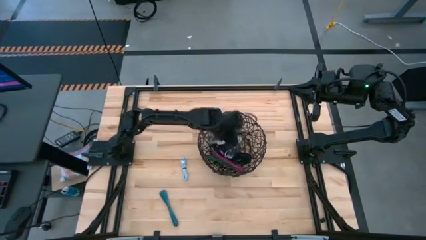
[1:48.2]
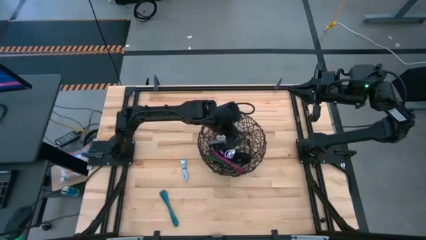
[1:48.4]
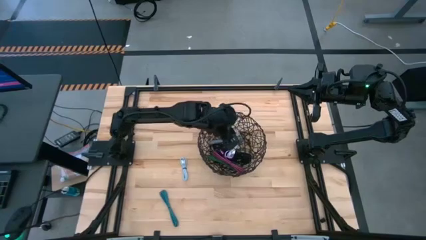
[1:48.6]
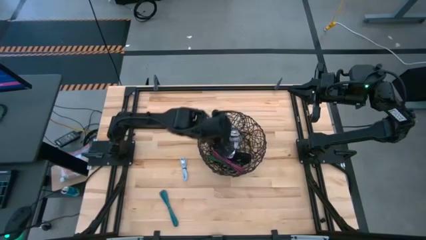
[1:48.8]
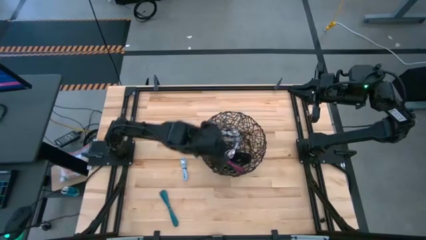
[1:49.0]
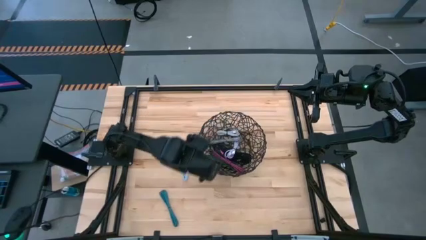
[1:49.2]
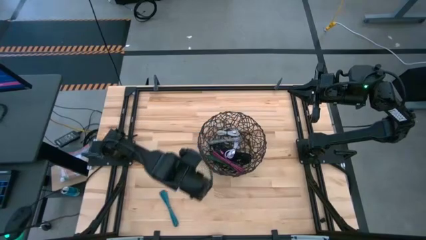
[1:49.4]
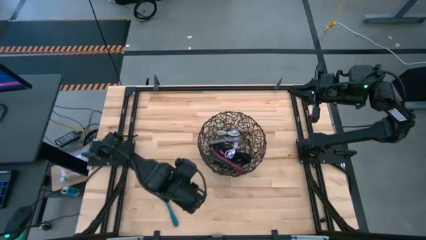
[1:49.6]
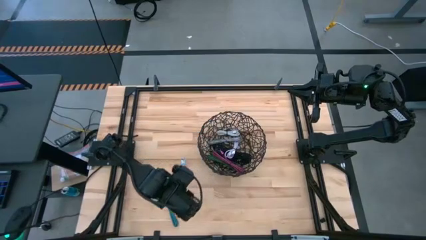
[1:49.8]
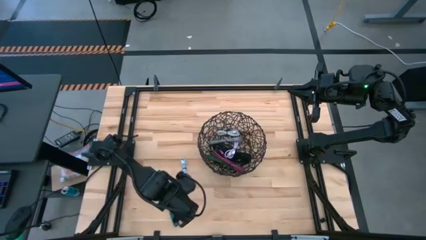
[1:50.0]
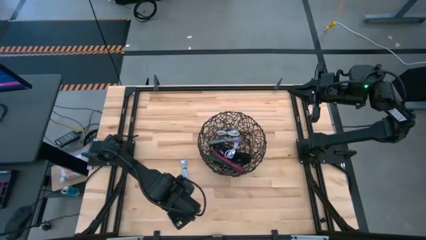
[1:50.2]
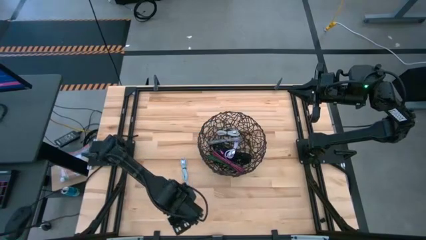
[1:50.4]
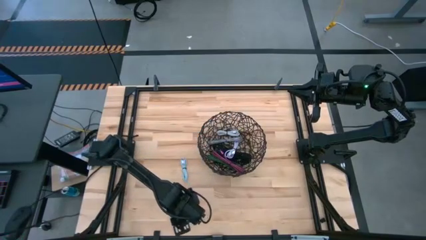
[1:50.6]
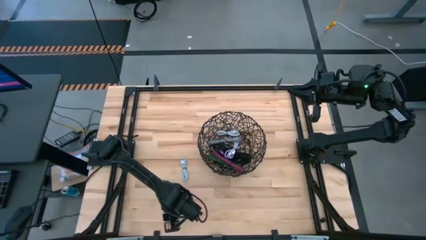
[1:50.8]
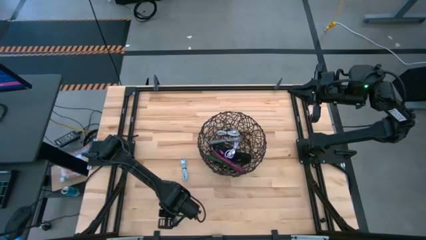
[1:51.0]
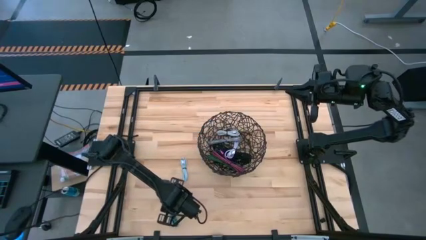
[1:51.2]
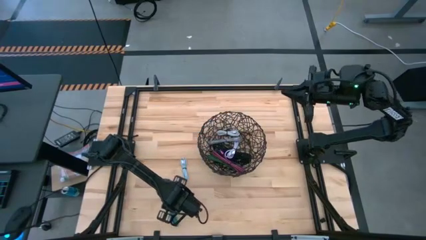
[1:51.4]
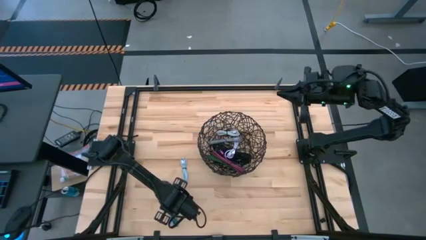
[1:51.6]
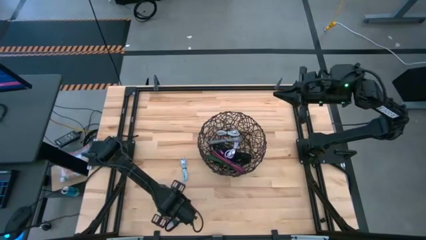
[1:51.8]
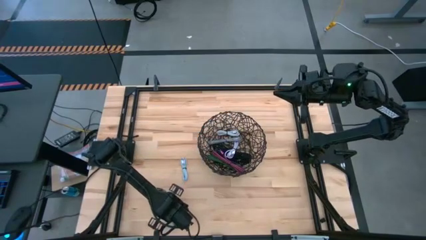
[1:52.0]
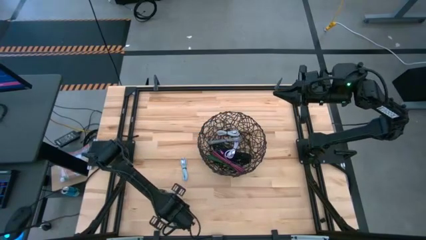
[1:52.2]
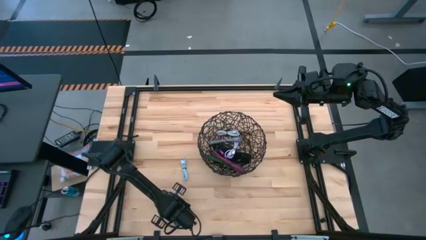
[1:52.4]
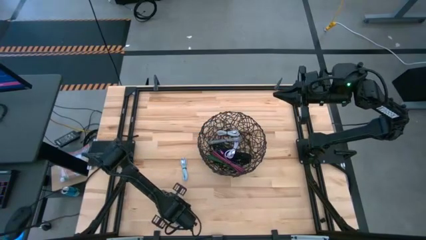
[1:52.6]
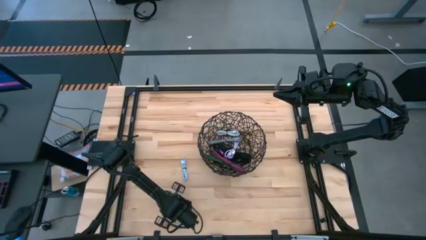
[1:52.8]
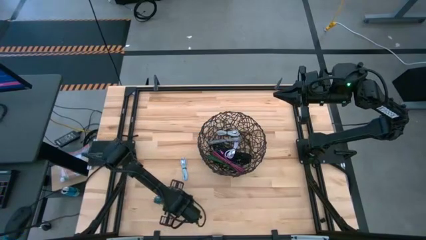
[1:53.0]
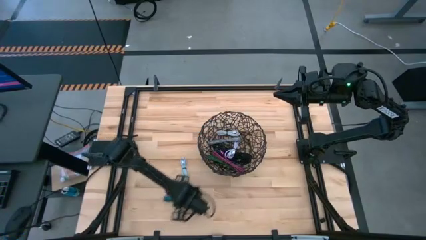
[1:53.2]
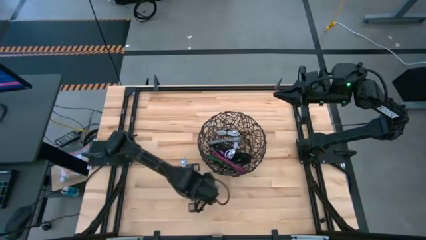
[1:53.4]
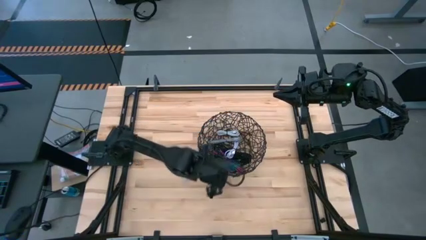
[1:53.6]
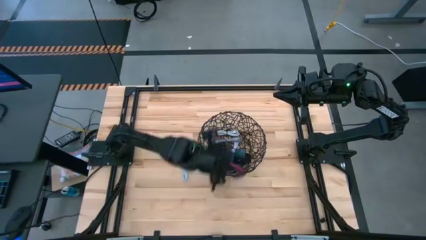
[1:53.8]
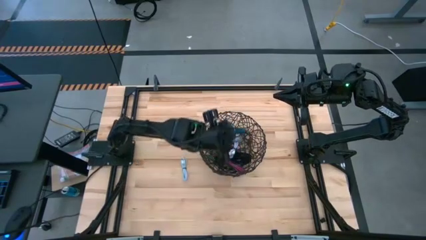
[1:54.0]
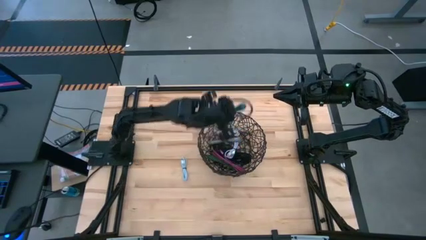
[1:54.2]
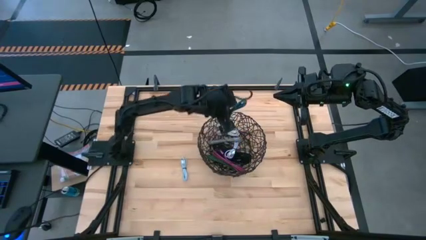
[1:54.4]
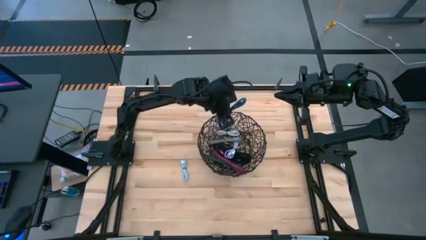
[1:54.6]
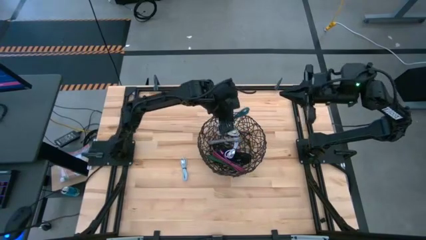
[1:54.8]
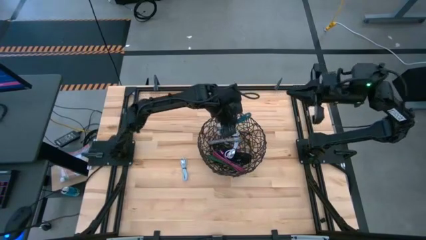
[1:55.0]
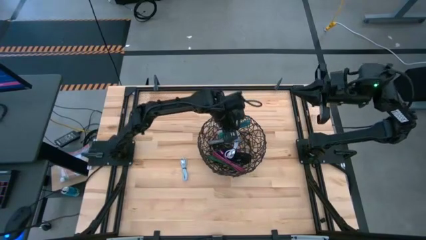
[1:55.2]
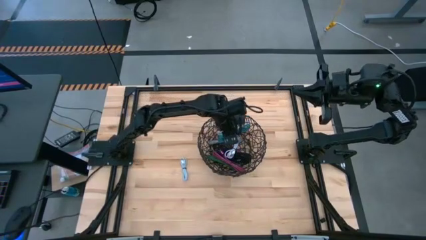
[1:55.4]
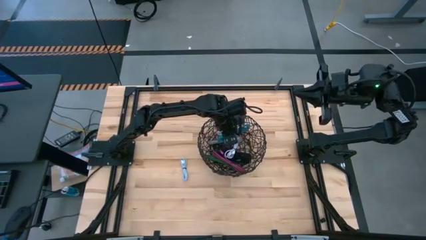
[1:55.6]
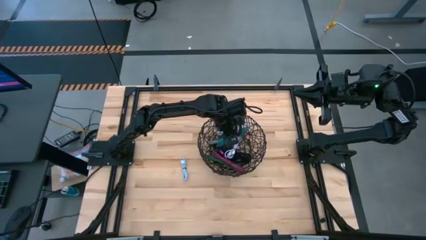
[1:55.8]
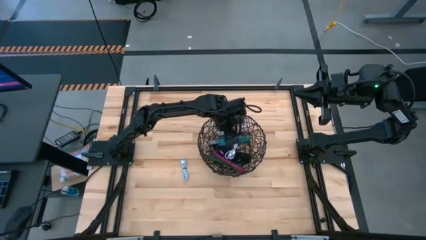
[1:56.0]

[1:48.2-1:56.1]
Task: Pick and place USB-C Cables
Put the blue charger cable into the black wire basket

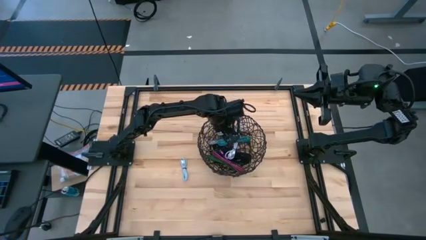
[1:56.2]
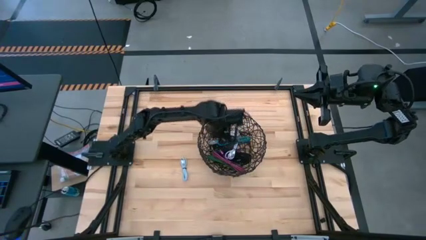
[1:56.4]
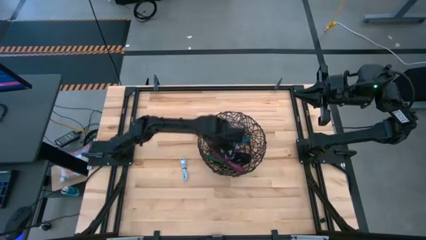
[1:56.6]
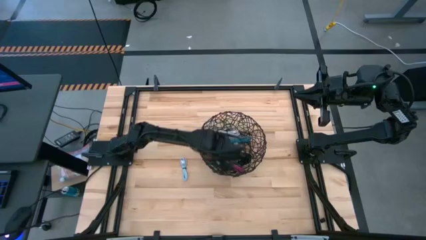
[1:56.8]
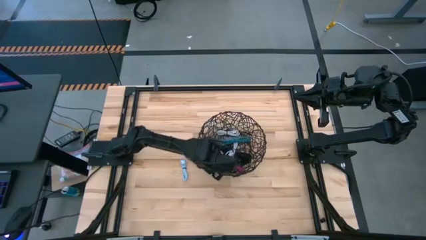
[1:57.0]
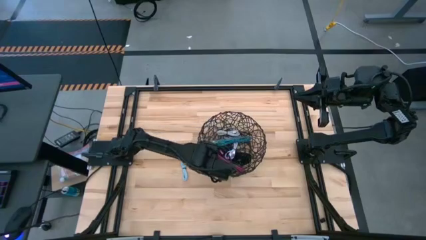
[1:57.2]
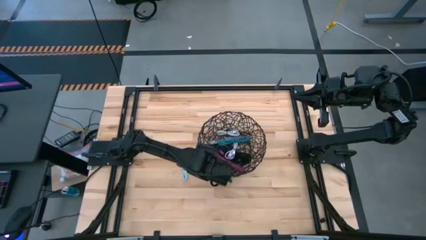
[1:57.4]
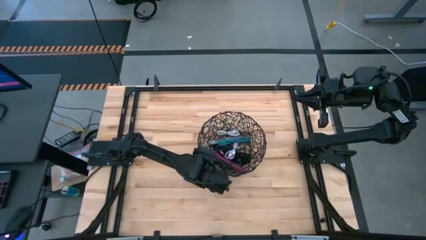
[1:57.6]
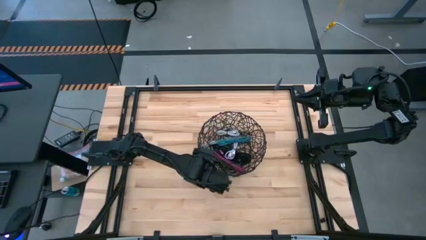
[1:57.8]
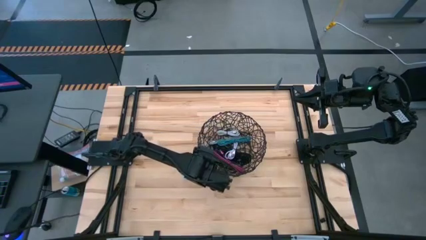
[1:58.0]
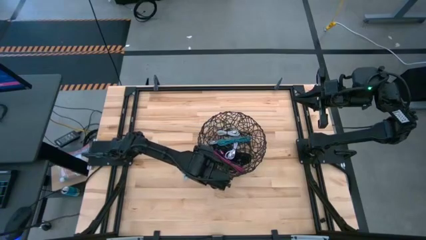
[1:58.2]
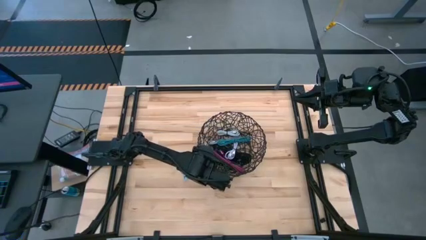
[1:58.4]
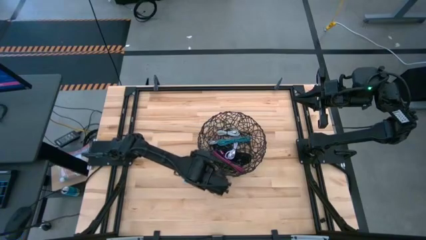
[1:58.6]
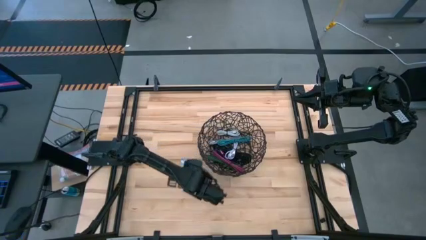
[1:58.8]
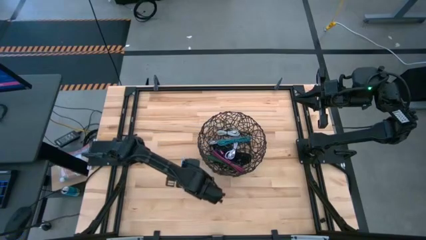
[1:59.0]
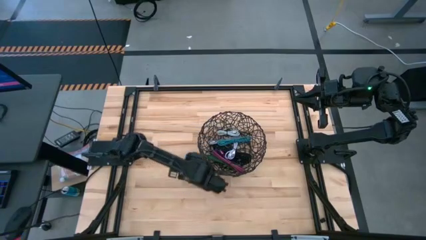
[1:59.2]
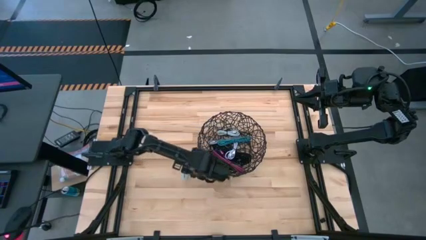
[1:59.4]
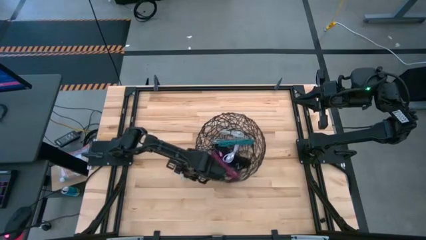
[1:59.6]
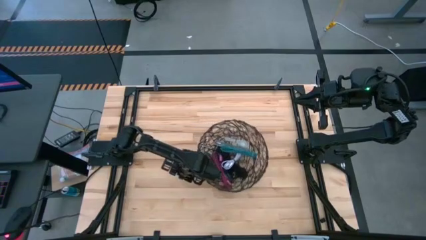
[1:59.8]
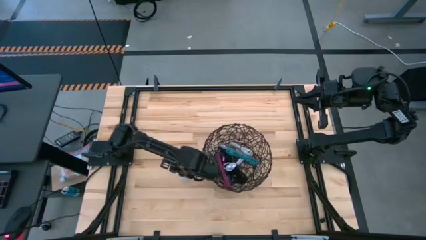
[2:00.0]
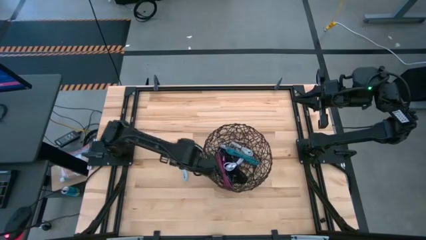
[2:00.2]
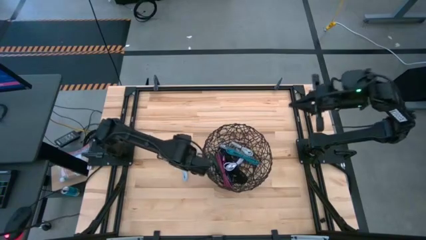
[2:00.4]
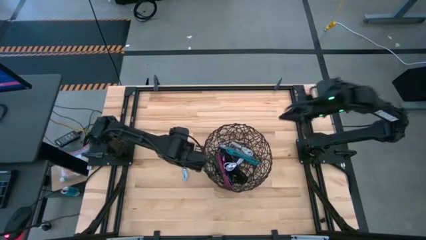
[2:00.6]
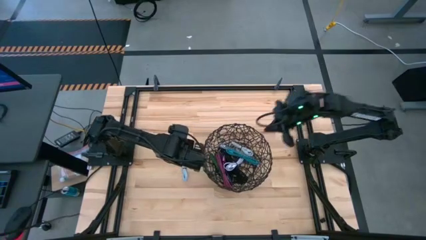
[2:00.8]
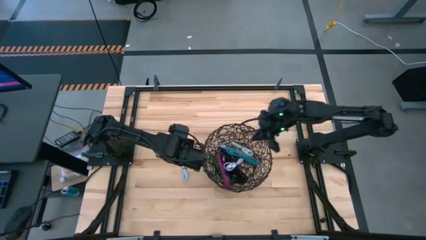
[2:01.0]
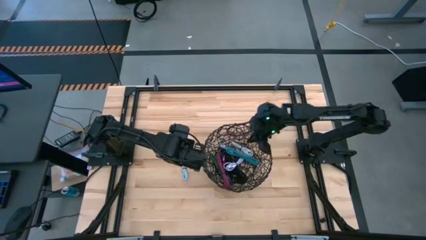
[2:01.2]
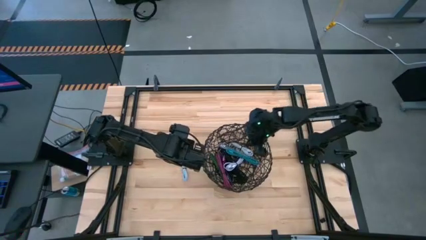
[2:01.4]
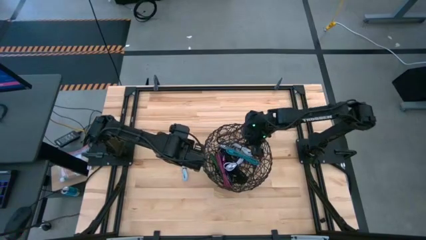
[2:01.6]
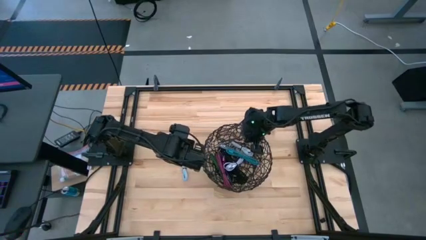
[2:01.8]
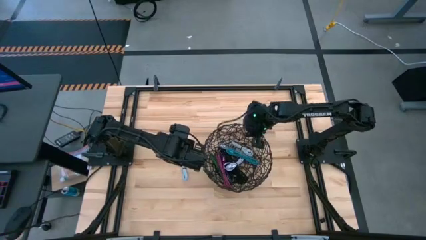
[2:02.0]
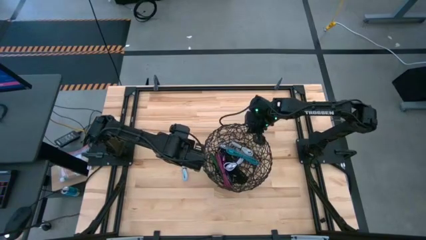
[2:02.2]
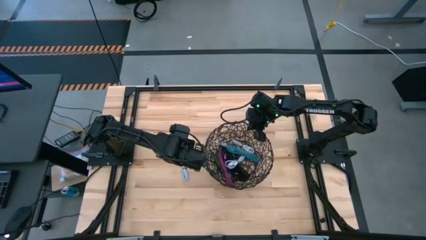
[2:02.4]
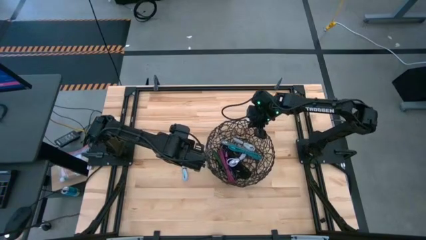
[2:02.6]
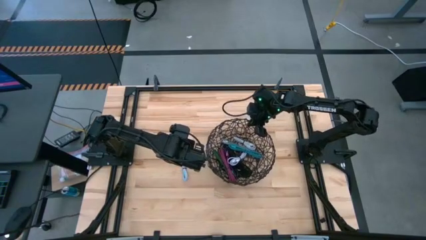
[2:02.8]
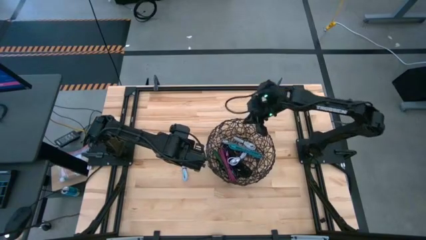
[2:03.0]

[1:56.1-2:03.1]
Adjust the black wire basket on the table

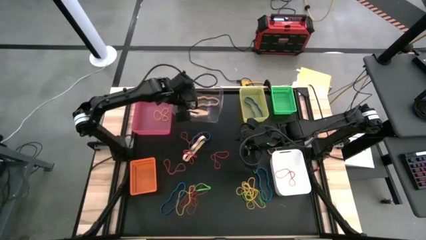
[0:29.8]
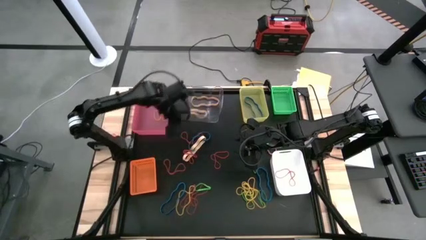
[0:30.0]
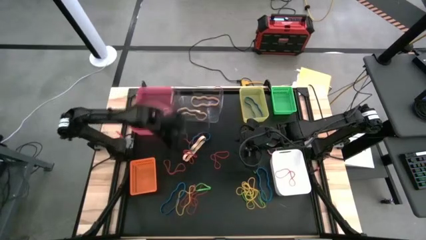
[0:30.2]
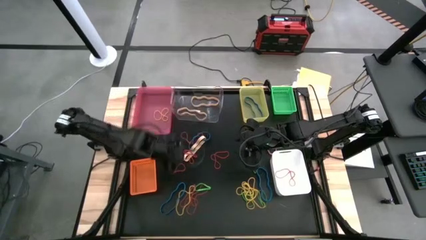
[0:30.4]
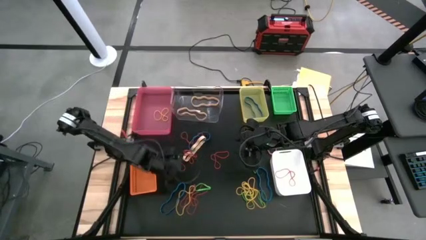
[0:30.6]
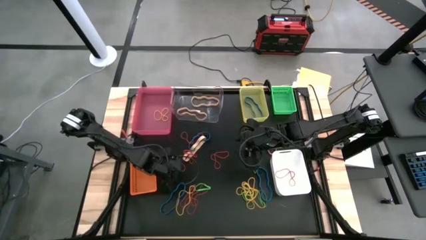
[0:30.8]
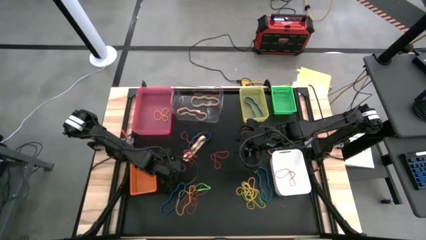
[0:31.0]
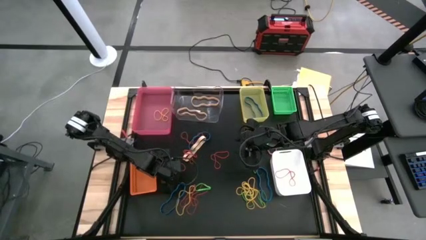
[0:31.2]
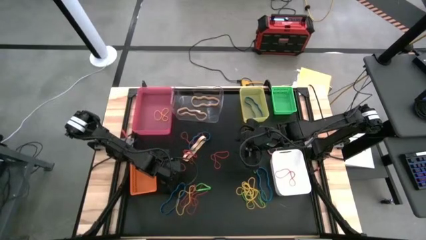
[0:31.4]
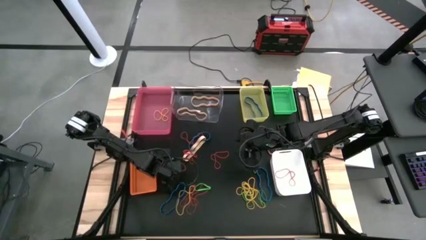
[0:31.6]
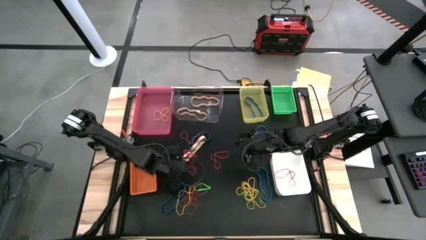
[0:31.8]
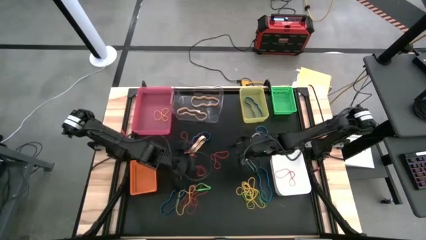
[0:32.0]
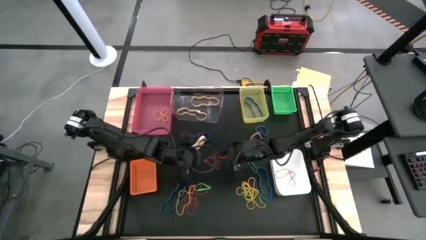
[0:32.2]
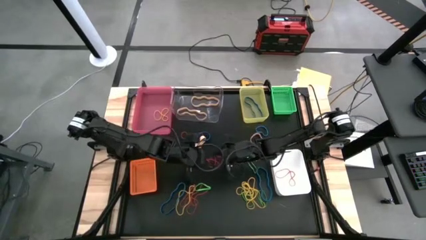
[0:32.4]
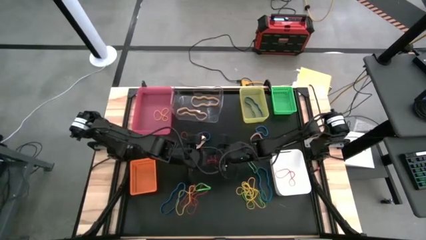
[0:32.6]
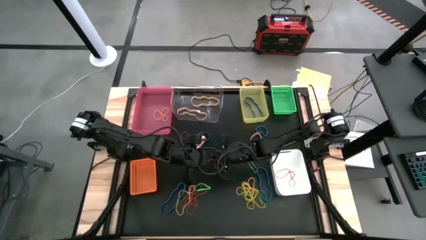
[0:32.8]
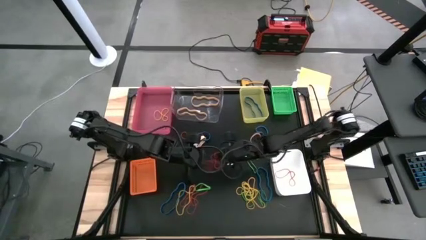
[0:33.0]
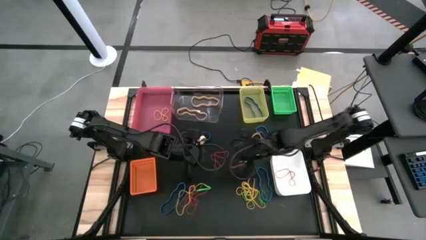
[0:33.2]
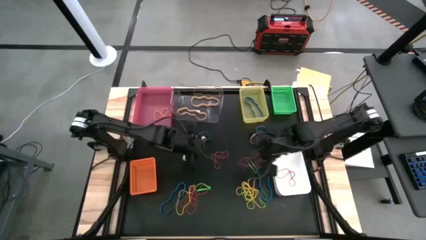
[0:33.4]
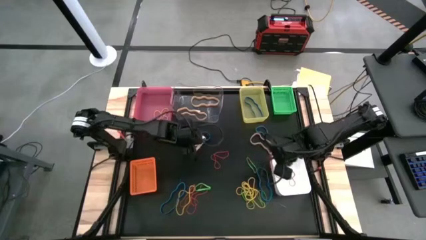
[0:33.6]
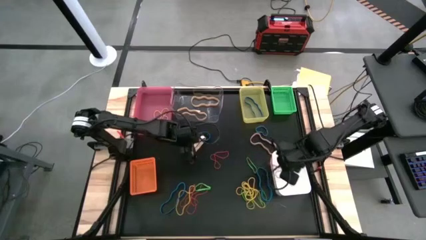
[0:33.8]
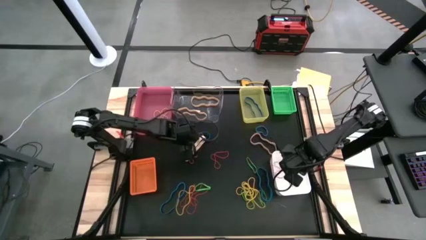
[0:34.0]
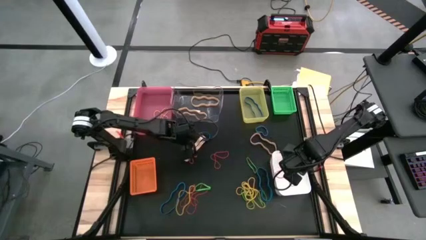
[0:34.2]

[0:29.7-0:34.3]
Task: Sort rubber bands into baskets
Put the red rubber band into the white bin
